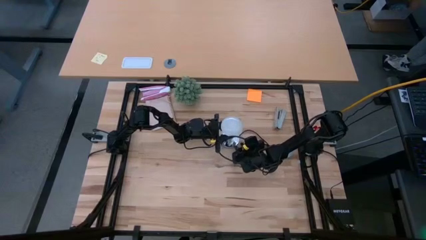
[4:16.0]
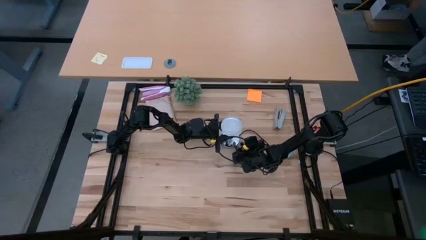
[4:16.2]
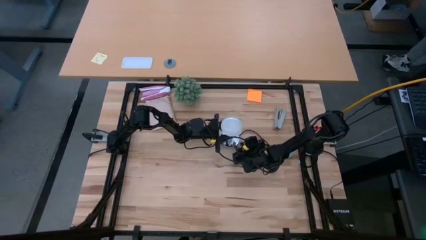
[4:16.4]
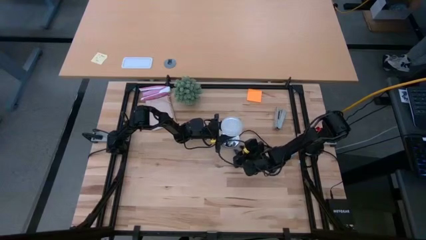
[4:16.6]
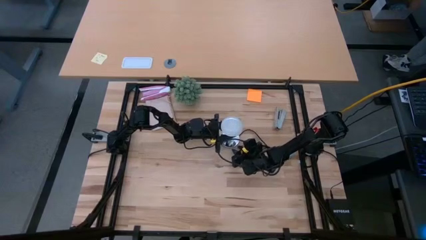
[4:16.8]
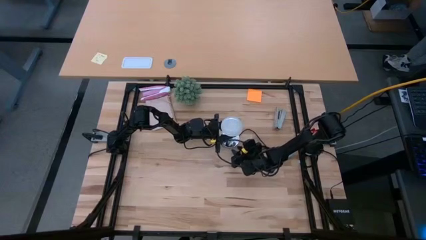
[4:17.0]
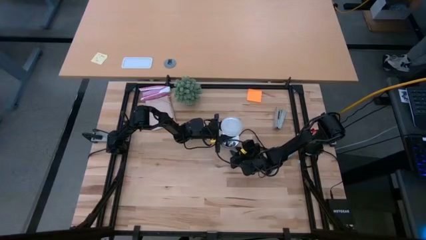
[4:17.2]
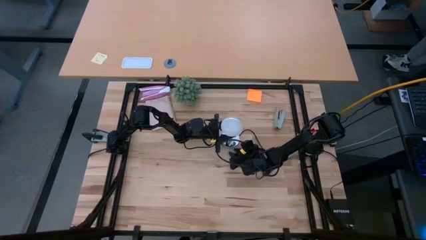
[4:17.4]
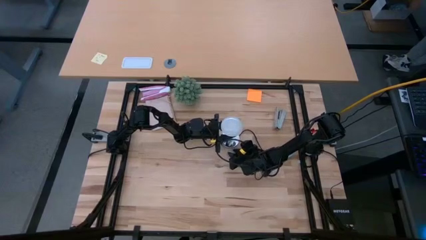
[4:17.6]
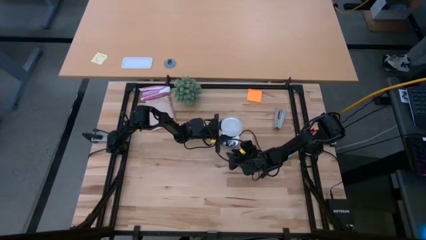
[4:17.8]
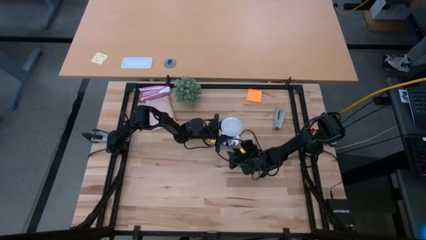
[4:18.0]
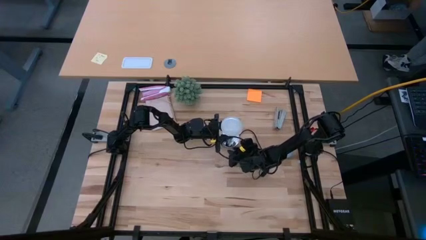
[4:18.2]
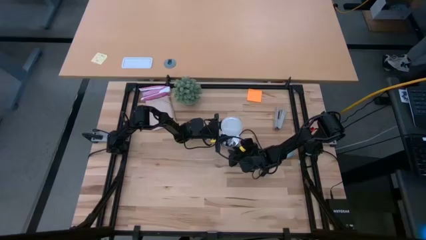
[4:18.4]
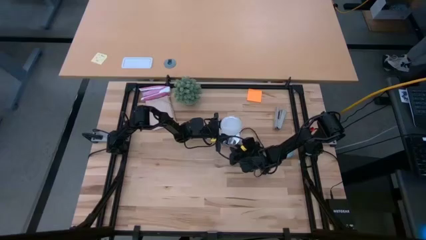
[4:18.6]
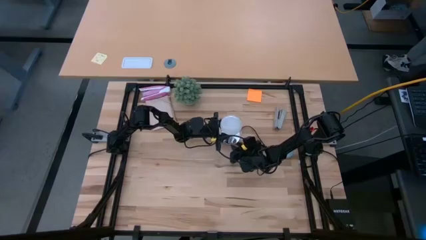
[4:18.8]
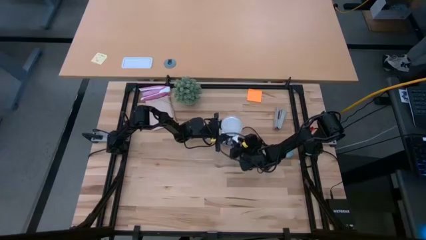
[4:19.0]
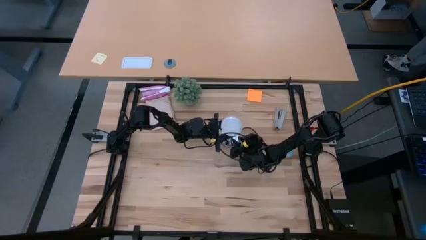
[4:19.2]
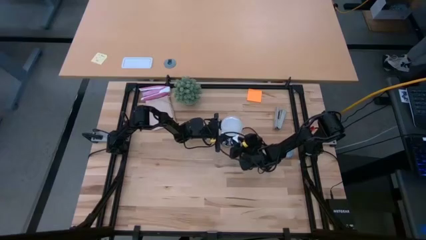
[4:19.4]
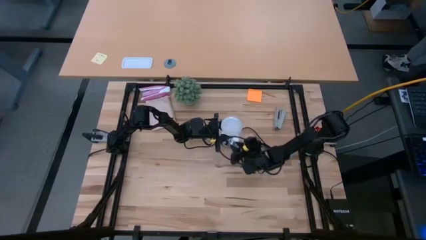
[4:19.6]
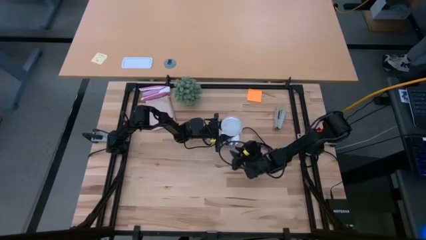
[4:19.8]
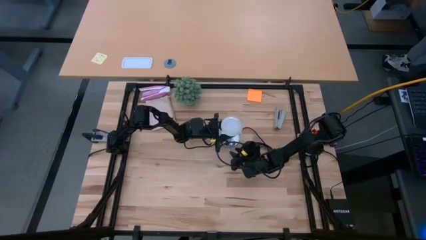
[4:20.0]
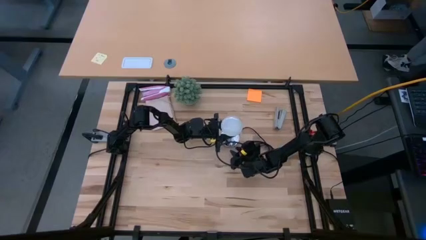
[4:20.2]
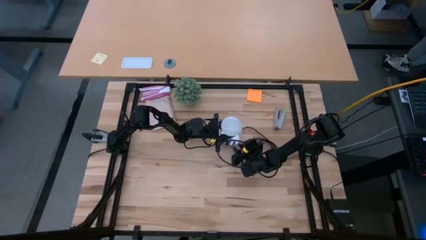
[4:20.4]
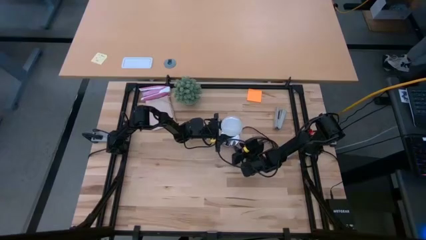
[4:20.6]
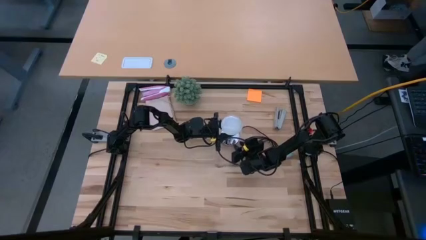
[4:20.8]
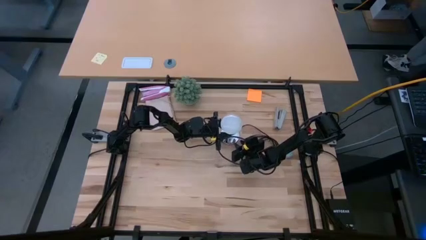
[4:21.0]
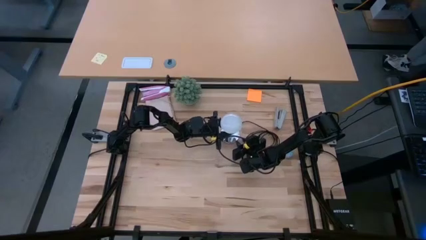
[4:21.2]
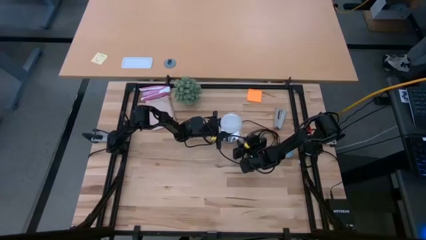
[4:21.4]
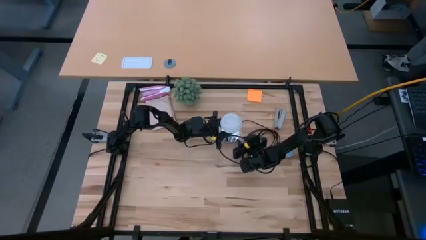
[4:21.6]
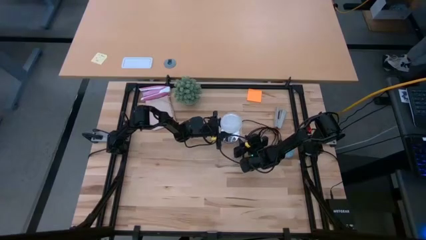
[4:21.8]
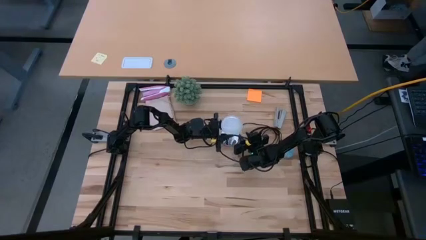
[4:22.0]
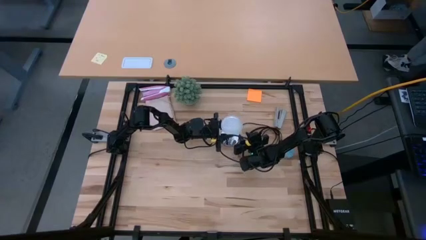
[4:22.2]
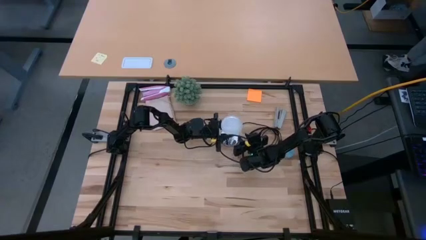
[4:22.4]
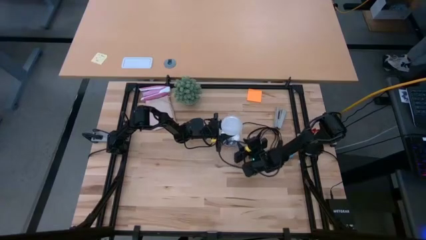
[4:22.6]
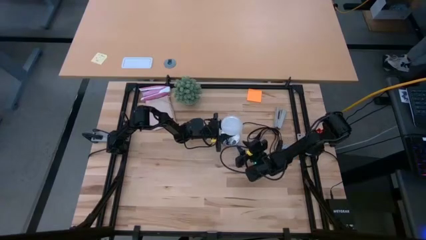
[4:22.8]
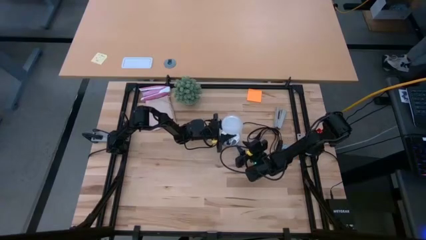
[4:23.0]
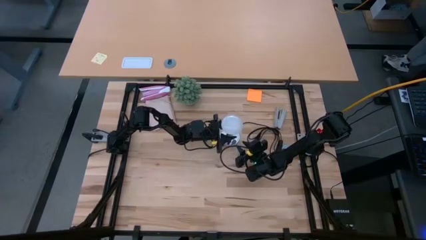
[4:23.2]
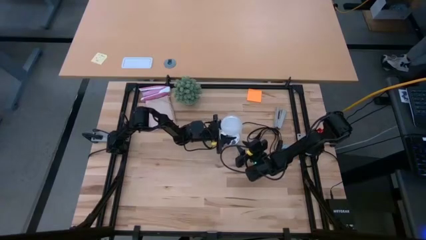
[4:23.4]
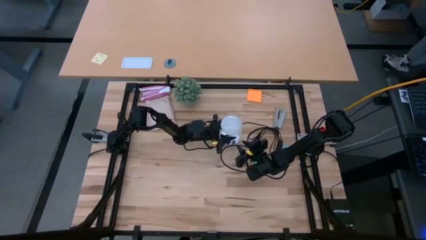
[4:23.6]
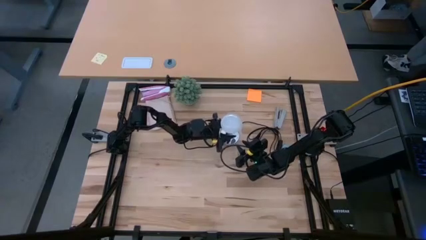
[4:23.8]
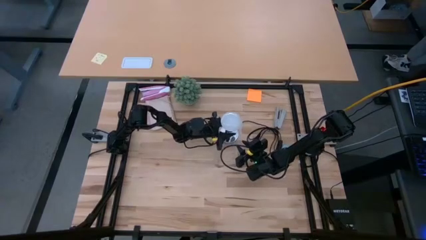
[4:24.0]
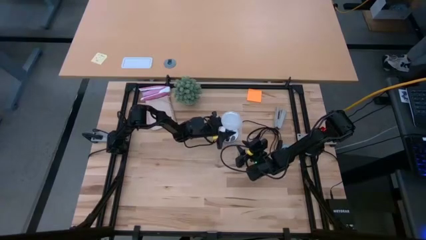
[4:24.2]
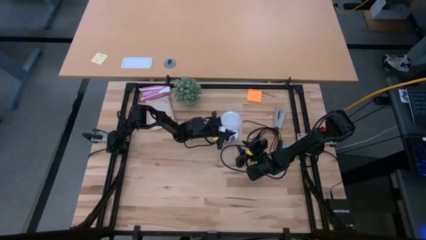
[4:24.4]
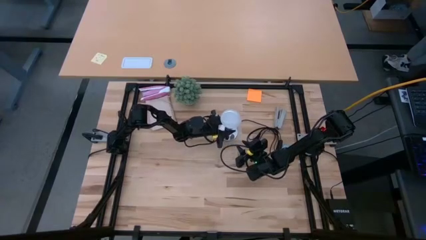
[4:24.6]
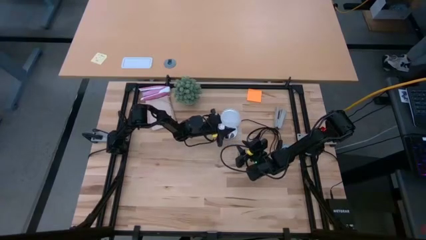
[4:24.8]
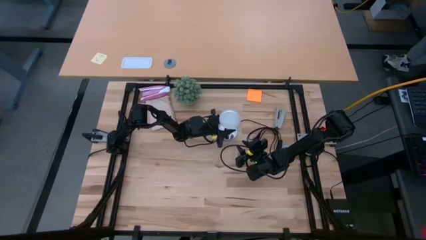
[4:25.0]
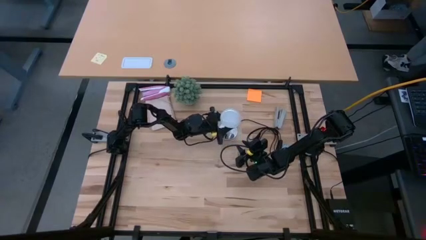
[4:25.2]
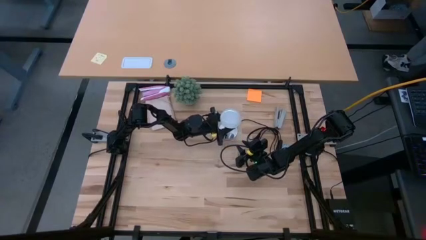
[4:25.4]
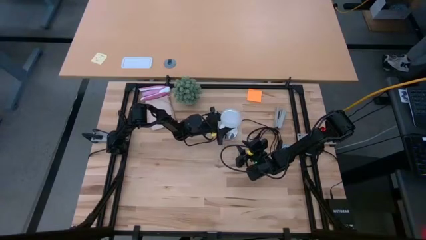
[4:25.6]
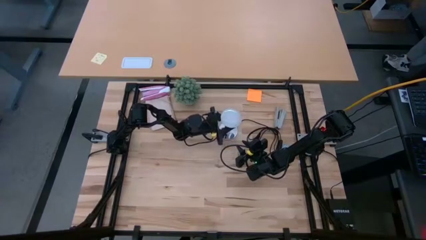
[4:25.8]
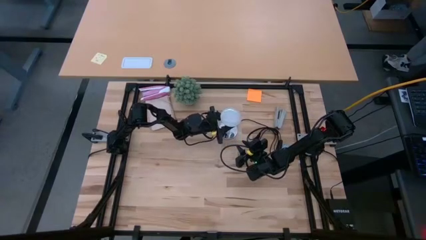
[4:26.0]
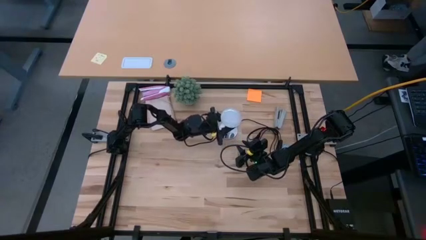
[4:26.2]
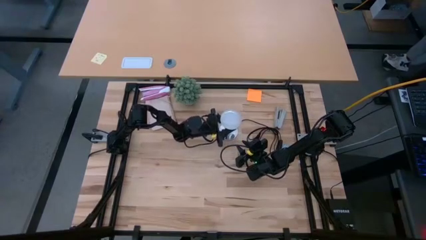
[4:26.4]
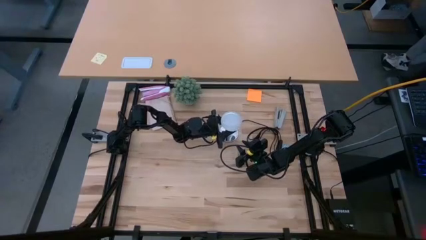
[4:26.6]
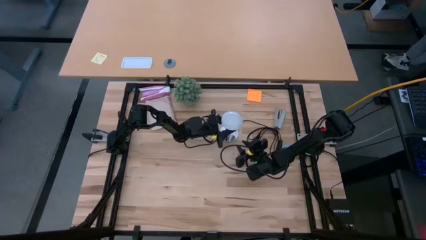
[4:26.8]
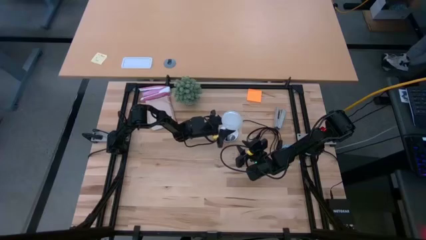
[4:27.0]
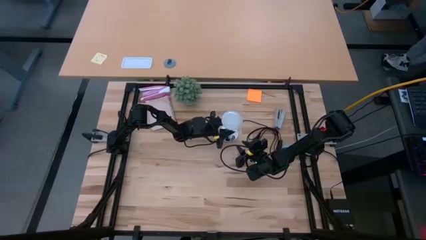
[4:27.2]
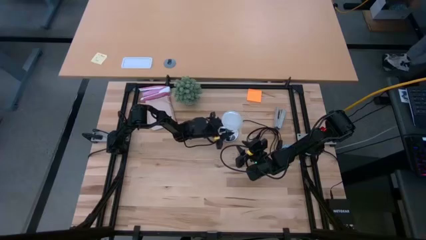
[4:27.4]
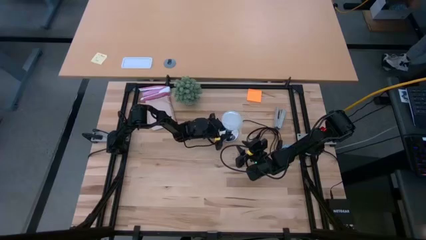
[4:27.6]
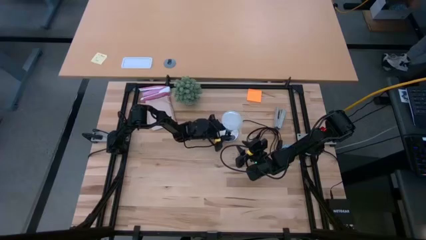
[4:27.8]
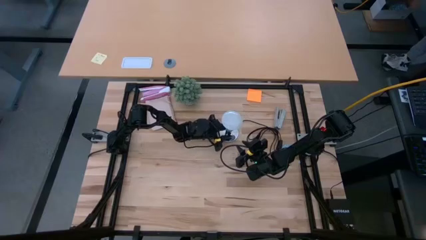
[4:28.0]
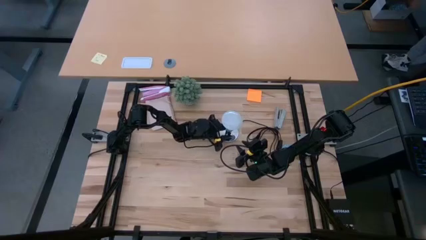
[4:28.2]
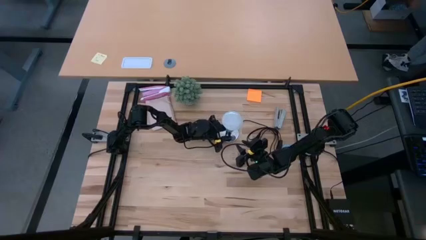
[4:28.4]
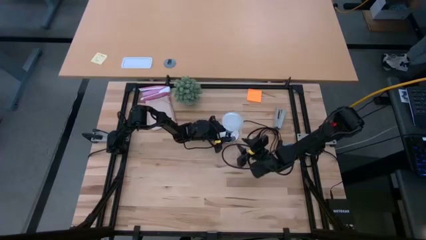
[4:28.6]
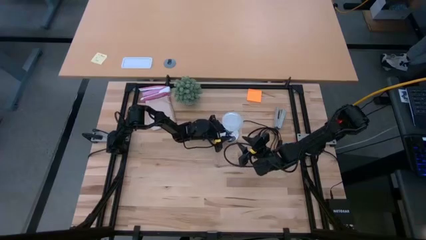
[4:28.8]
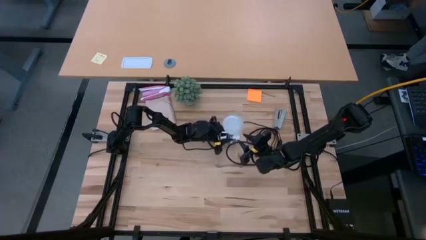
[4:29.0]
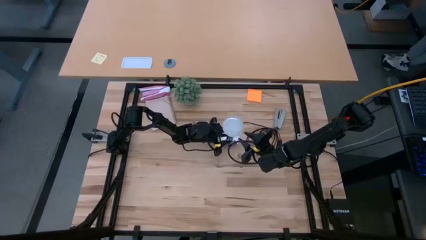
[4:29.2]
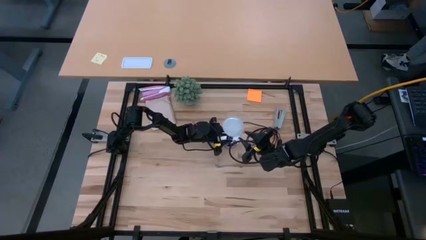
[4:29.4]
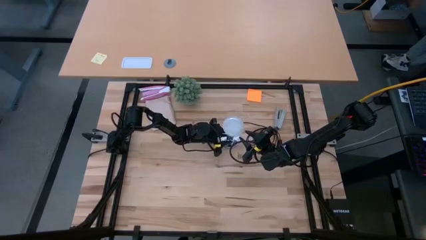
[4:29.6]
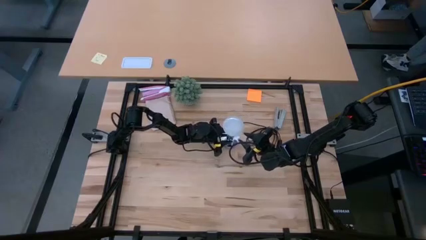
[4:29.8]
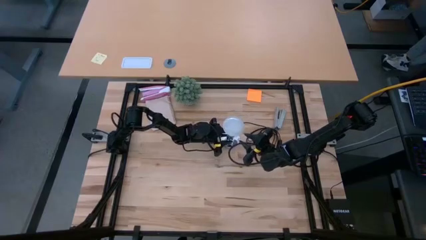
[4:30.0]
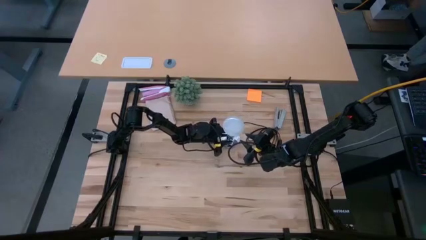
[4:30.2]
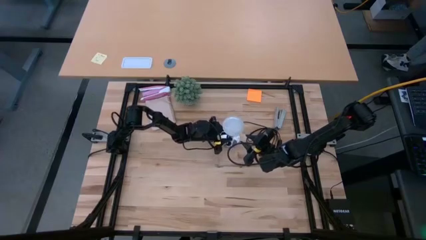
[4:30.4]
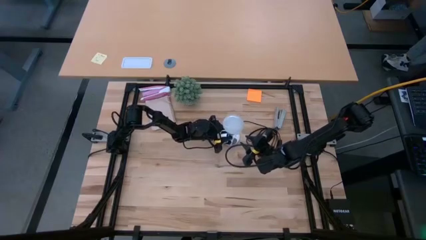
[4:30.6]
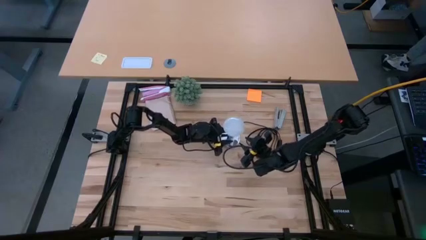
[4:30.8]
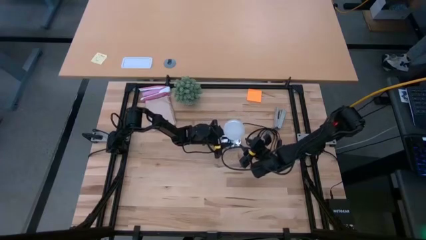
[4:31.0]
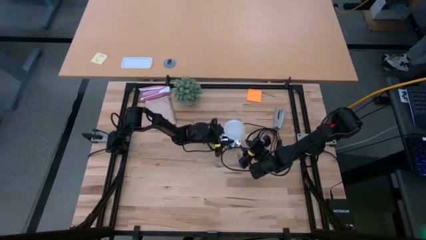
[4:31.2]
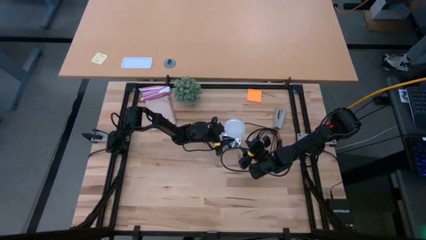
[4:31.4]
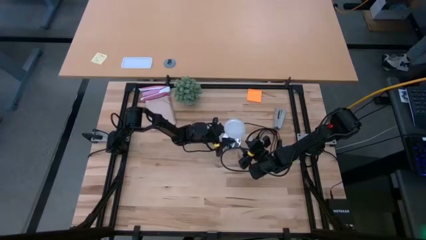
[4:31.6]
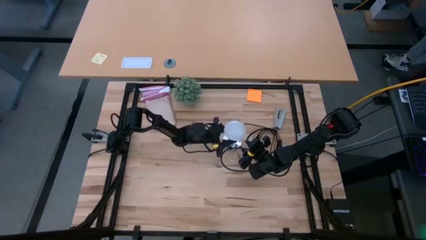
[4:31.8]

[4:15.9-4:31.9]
Task: Screw lightbulb
Remove the lightbulb from the lamp
